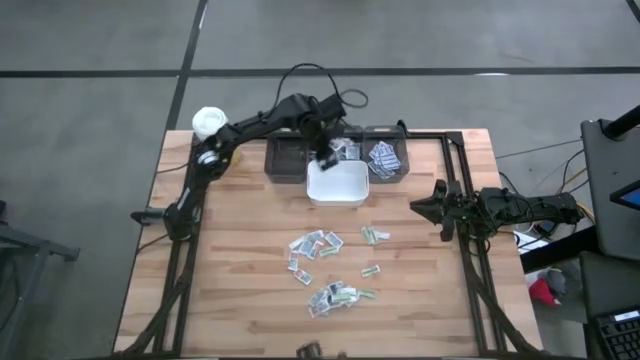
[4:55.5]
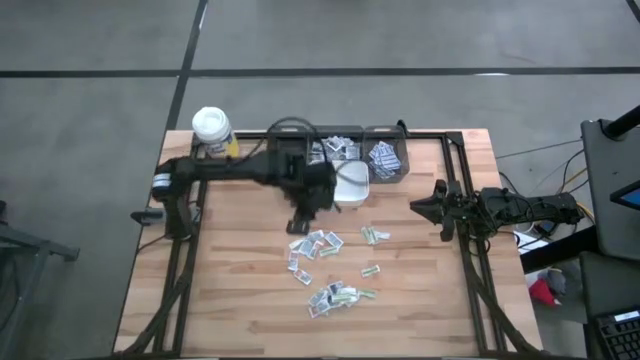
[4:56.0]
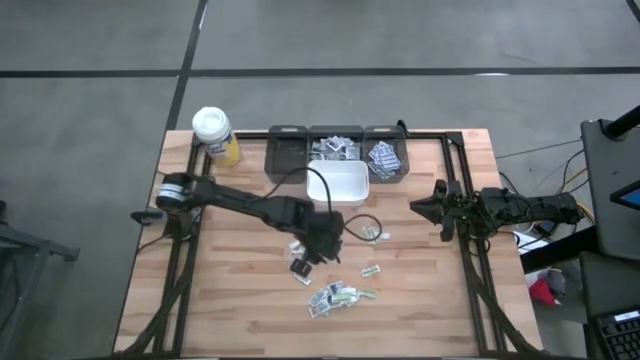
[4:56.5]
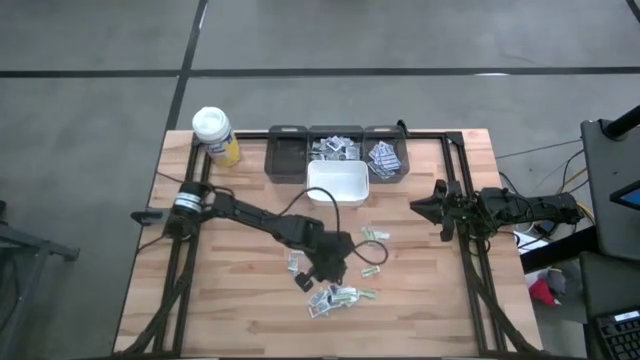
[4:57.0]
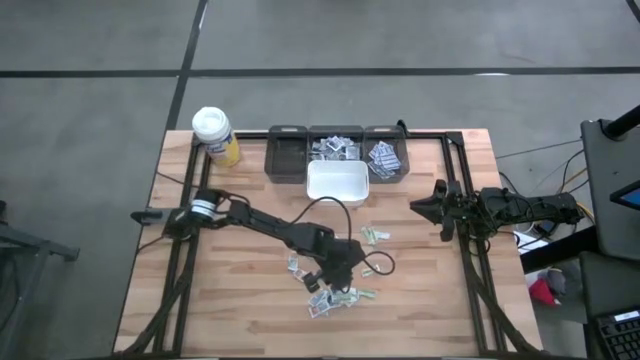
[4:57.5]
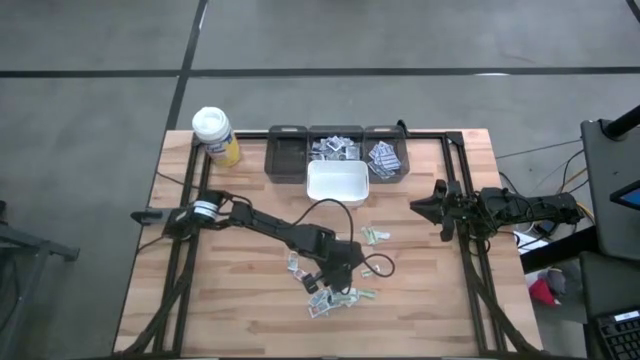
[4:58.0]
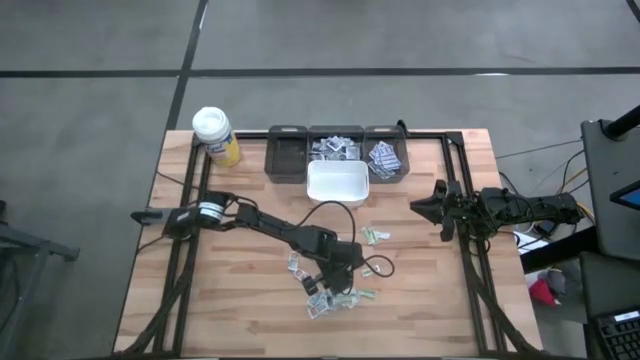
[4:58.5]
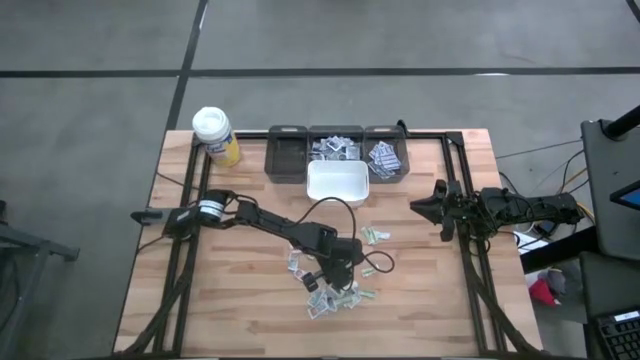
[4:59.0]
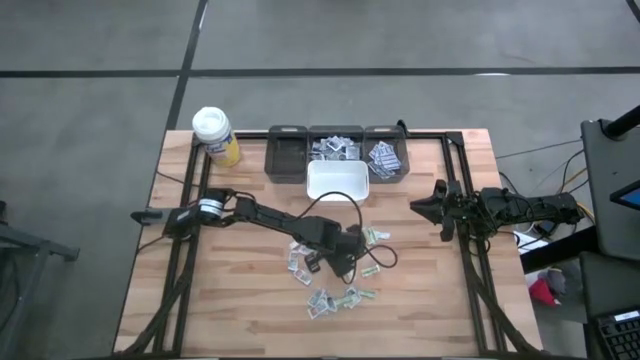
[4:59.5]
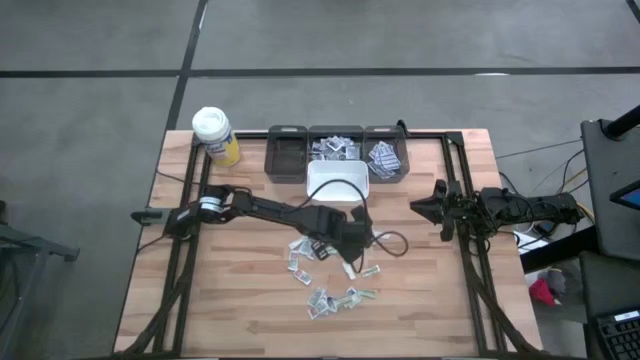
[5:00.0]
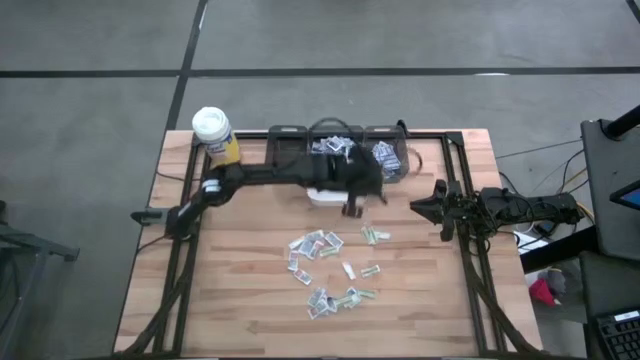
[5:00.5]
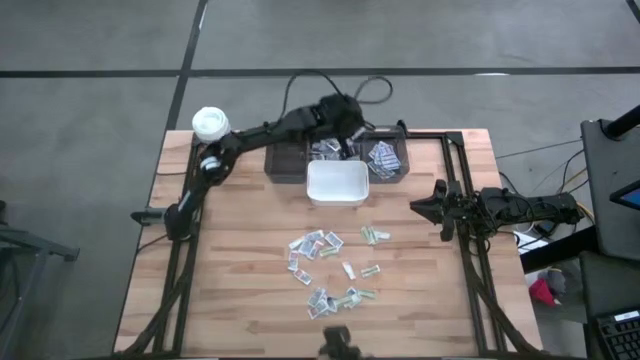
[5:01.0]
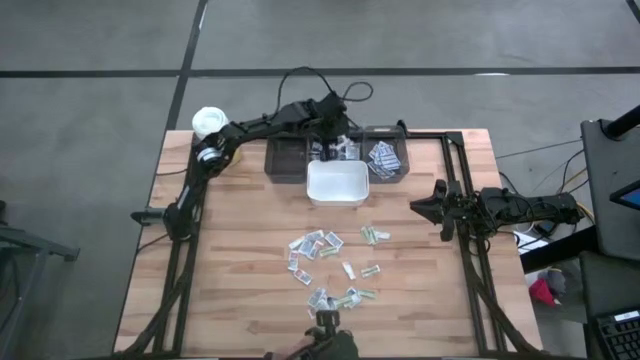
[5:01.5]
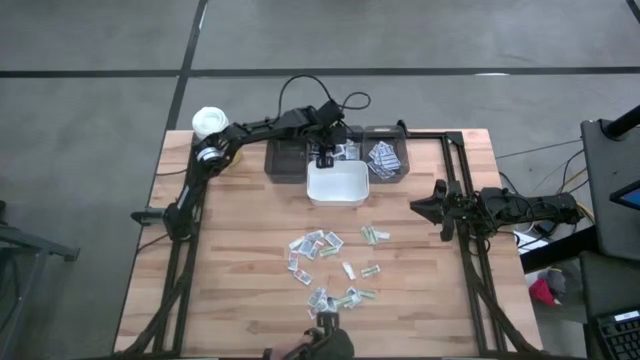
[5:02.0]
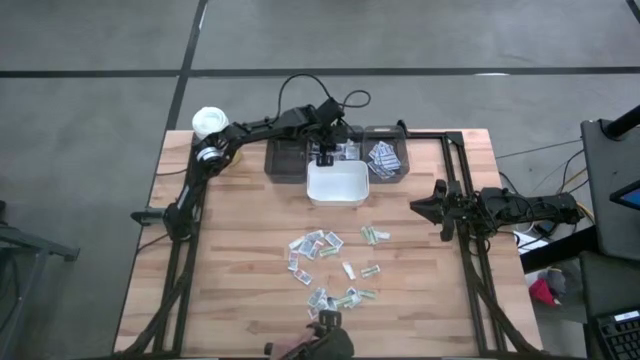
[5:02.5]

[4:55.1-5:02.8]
Task: Pick & Place First Aid Supplies
Put the alcohol pad into the middle black bin

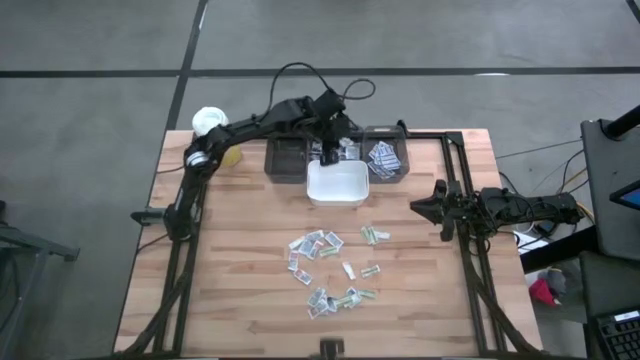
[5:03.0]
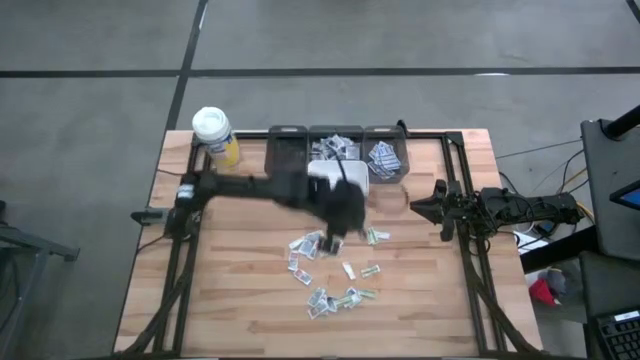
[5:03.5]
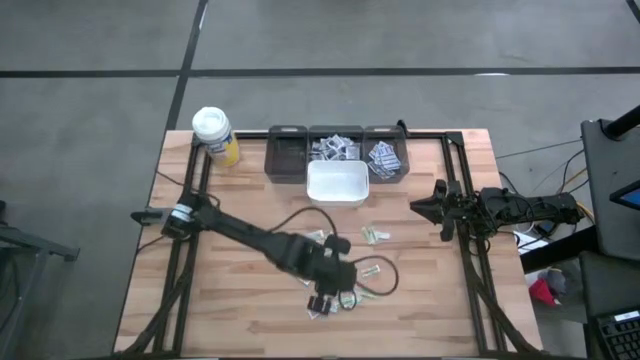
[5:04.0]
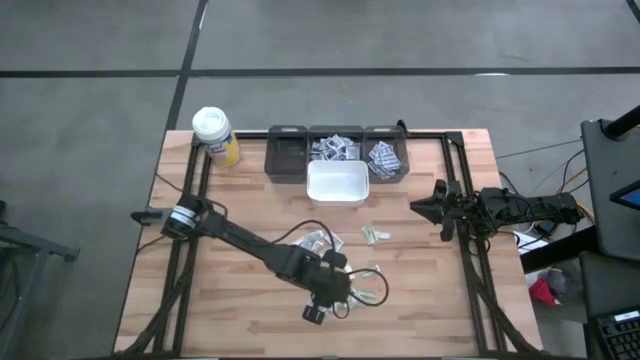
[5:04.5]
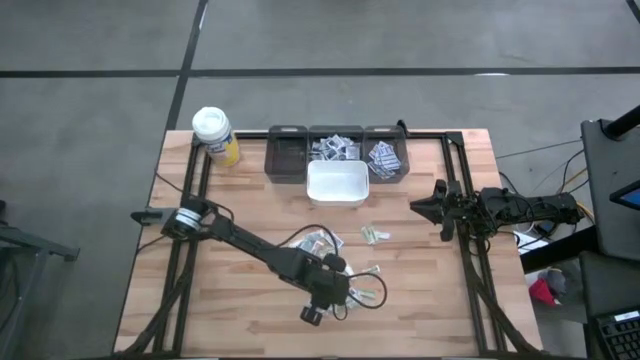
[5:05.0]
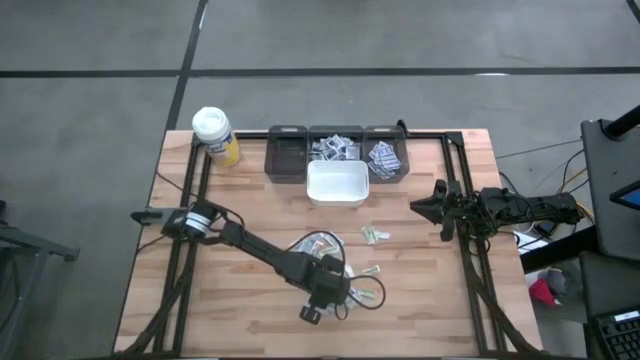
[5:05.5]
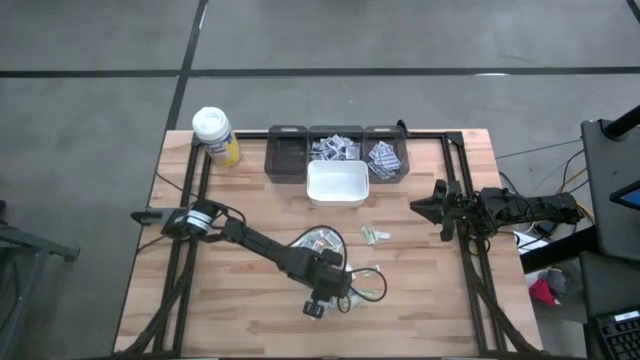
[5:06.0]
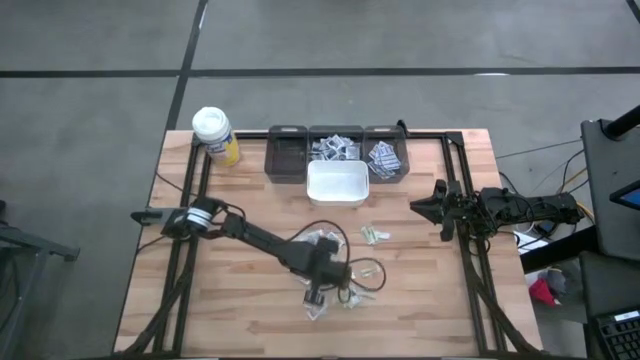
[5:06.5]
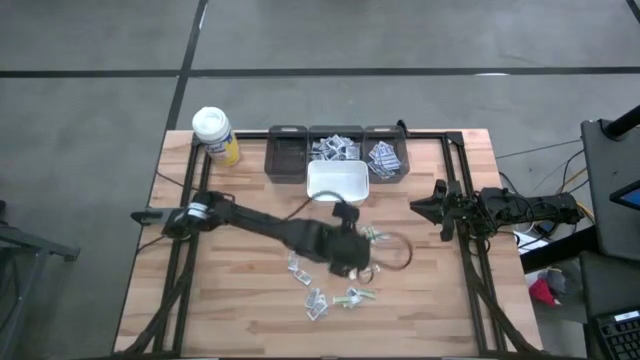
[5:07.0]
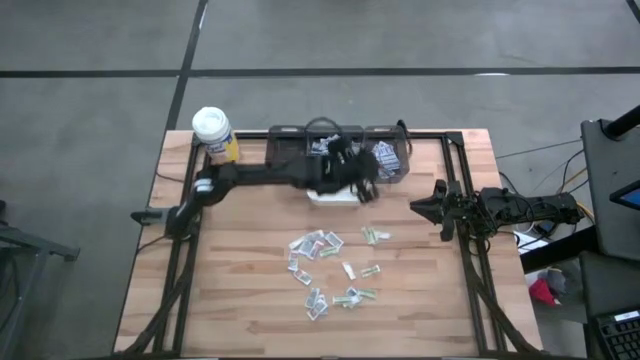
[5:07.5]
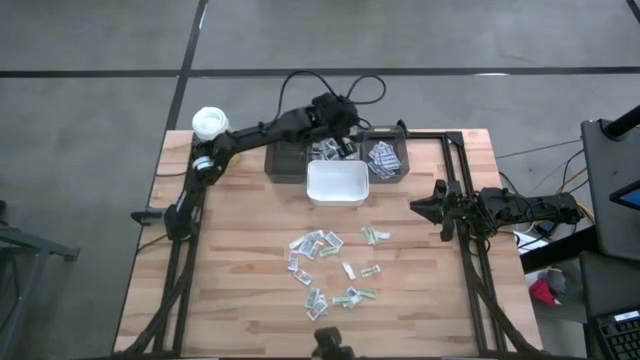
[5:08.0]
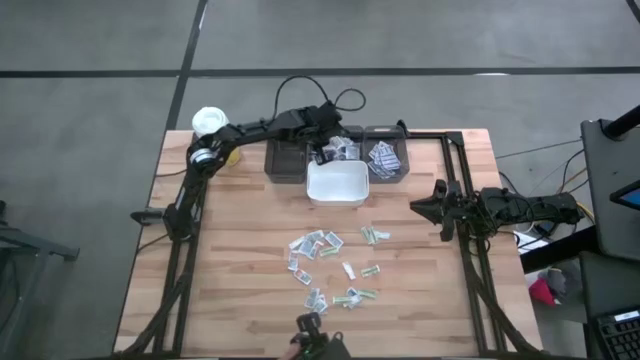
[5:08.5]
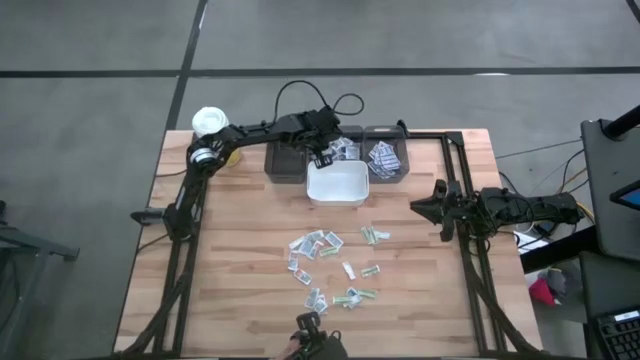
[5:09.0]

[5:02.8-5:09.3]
Put the bottom left alcohol pad into the middle black bin

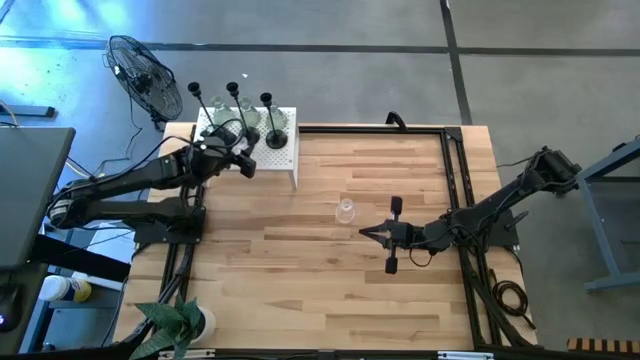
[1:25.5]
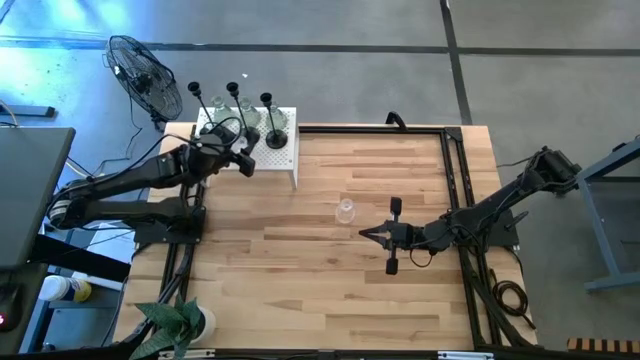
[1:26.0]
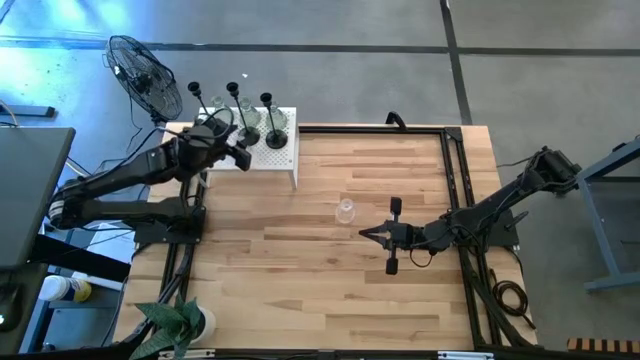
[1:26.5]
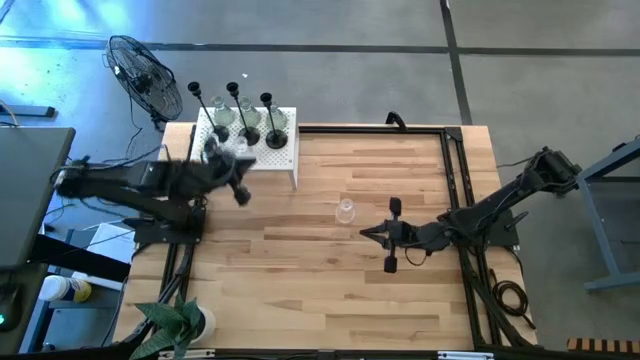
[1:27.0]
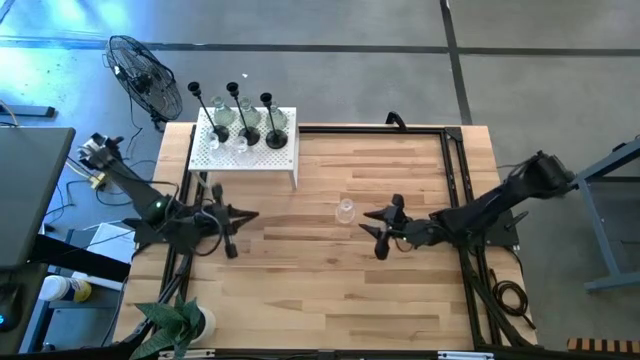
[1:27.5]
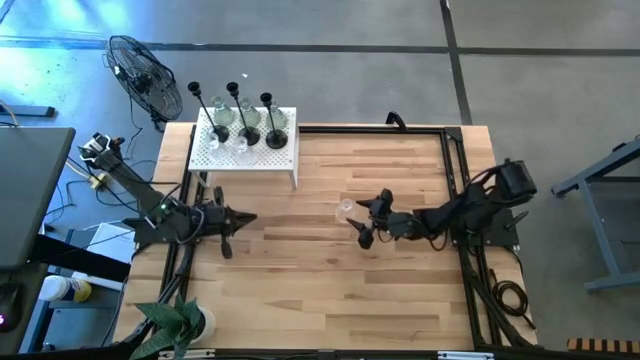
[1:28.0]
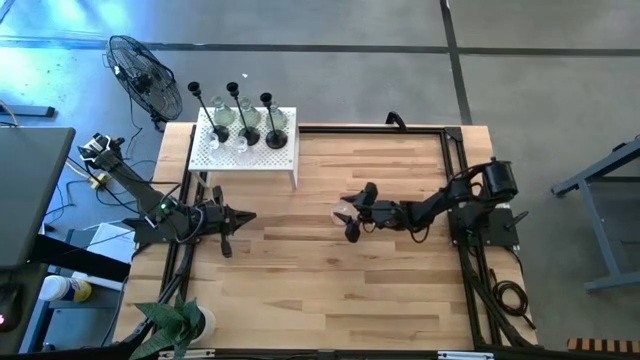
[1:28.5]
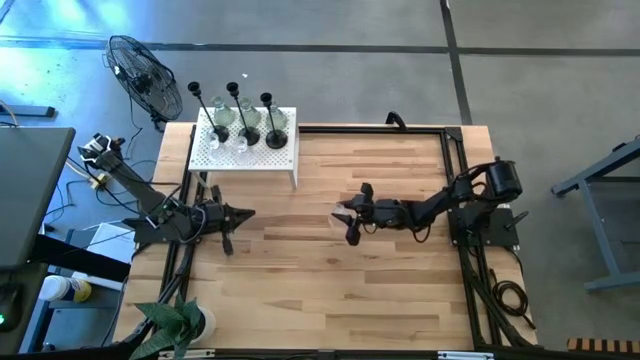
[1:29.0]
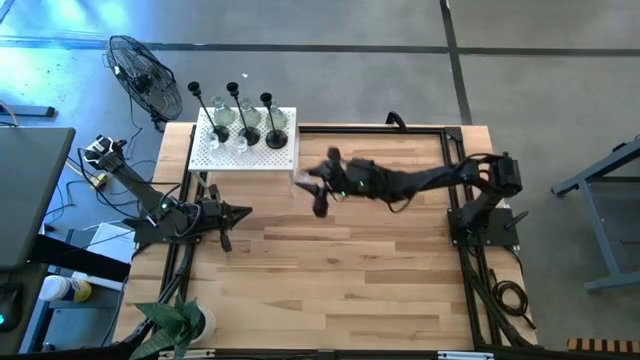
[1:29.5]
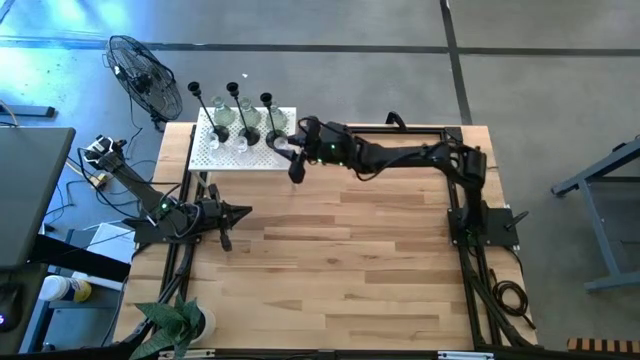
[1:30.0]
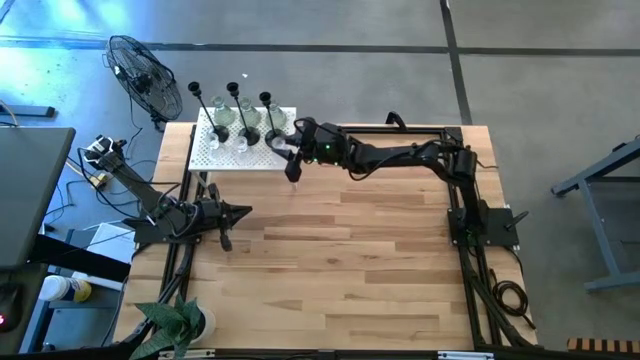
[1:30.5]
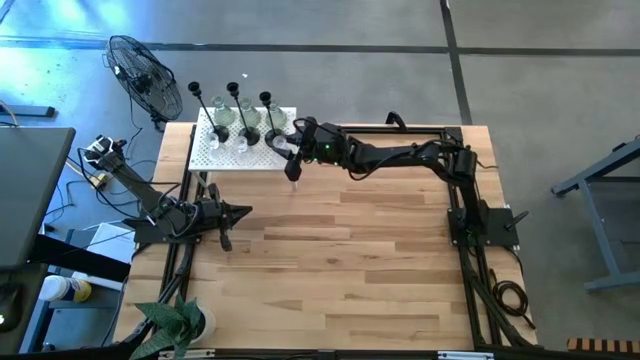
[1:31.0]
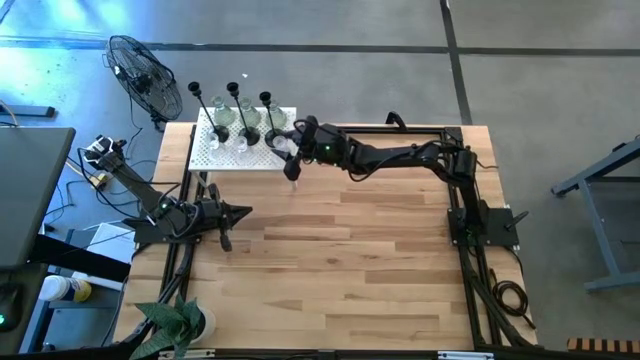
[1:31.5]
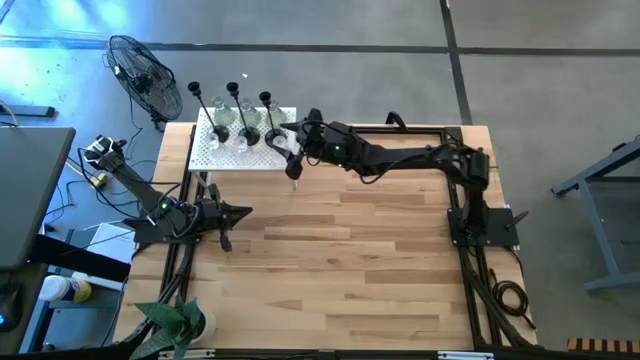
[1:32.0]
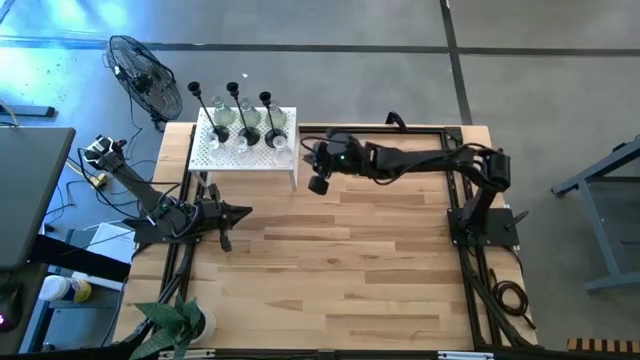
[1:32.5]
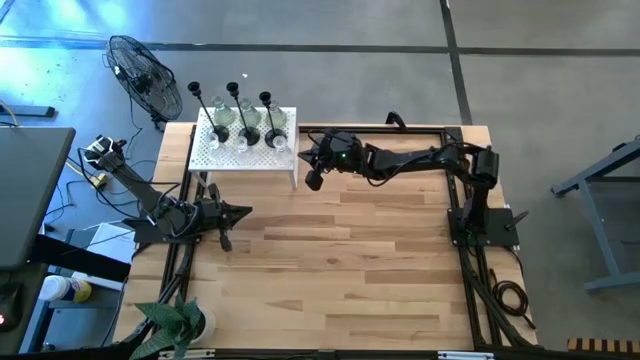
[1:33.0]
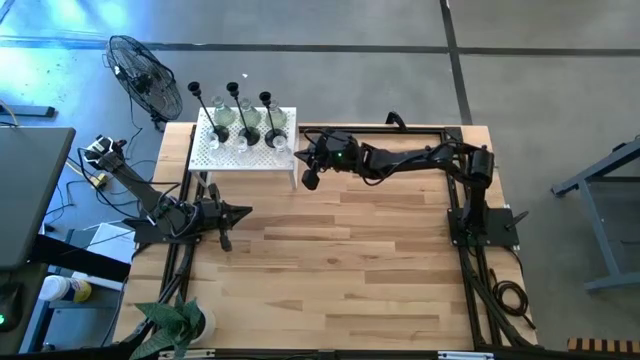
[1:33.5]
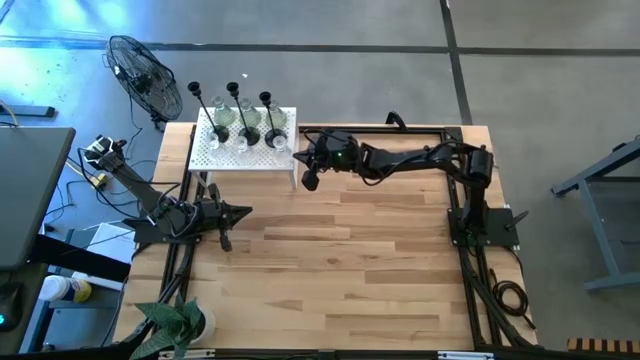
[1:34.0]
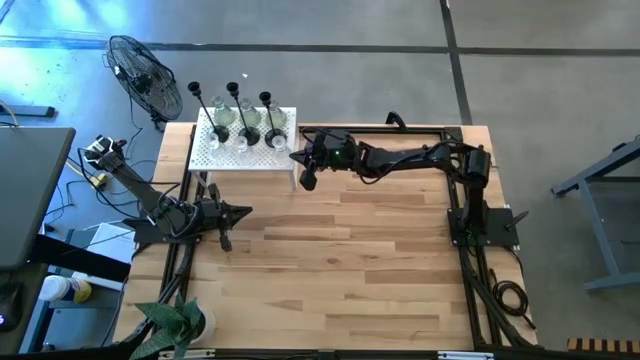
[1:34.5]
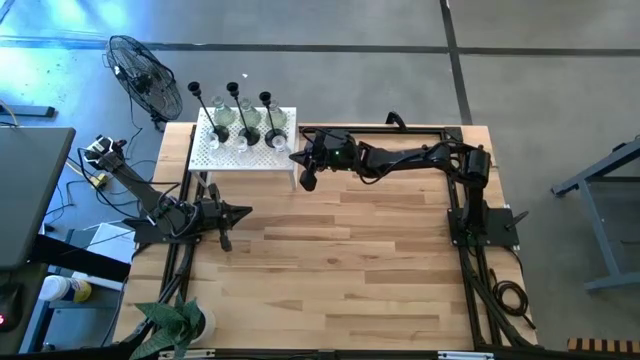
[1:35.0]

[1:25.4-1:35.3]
Task: Pick & Place candle stick holders
Put the transparent glass candle holder on the shelf aligned with the other transparent glass candle holders
